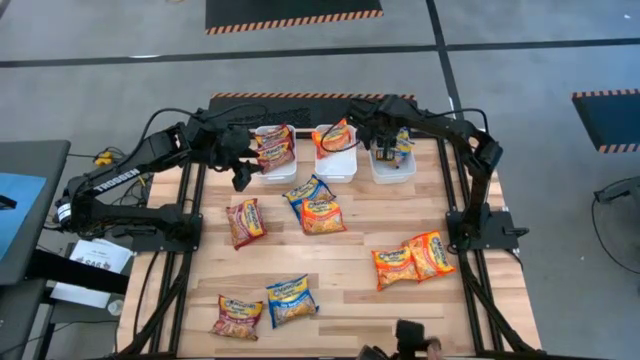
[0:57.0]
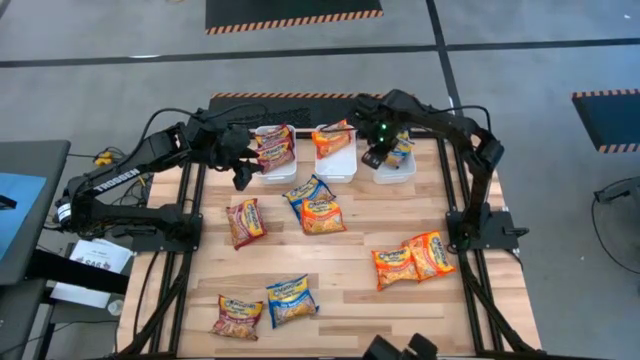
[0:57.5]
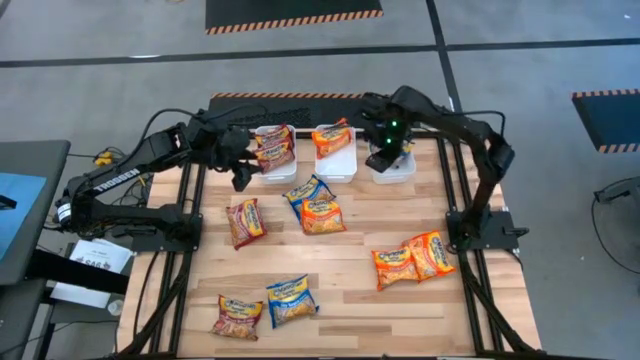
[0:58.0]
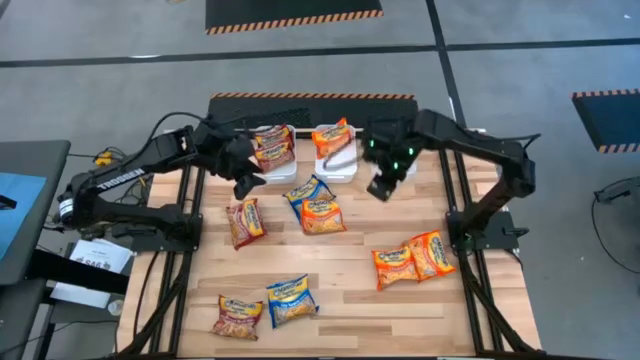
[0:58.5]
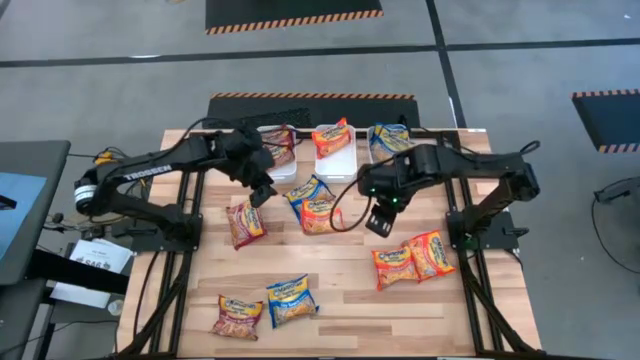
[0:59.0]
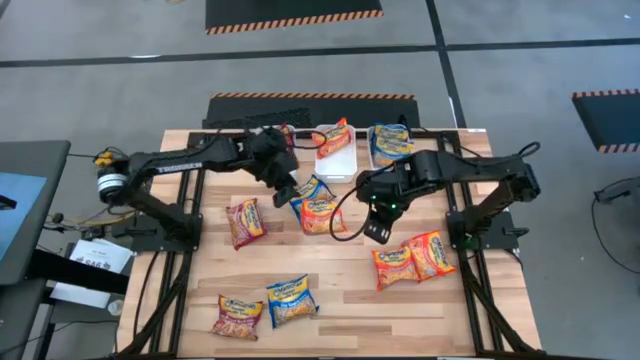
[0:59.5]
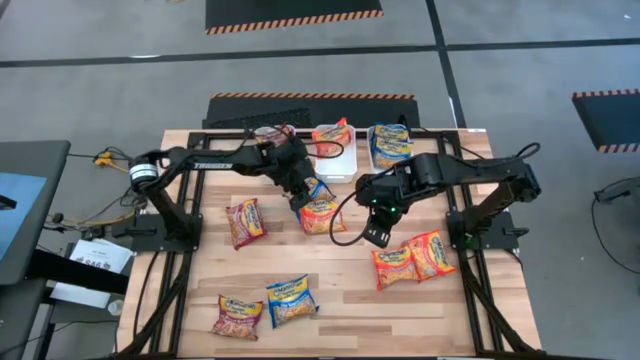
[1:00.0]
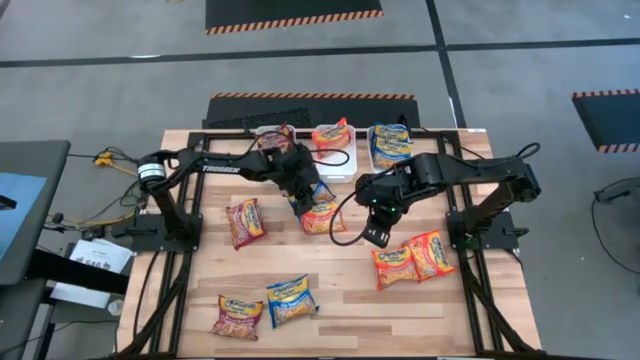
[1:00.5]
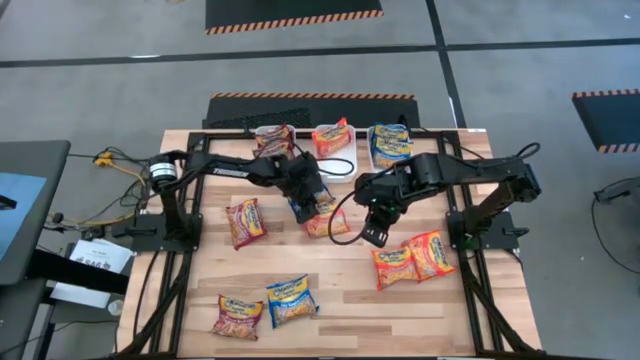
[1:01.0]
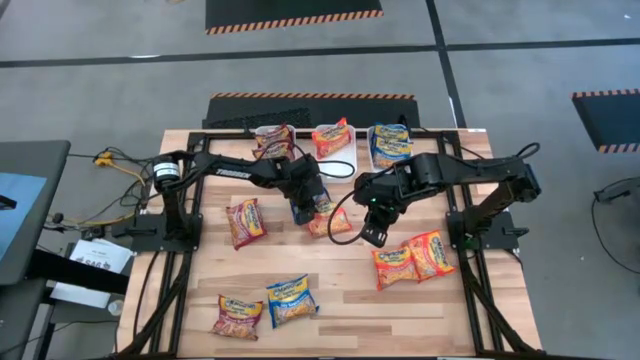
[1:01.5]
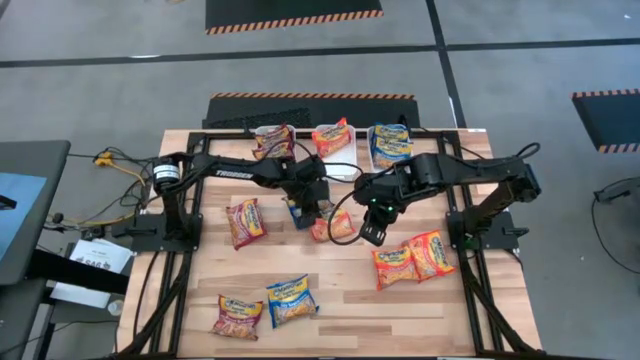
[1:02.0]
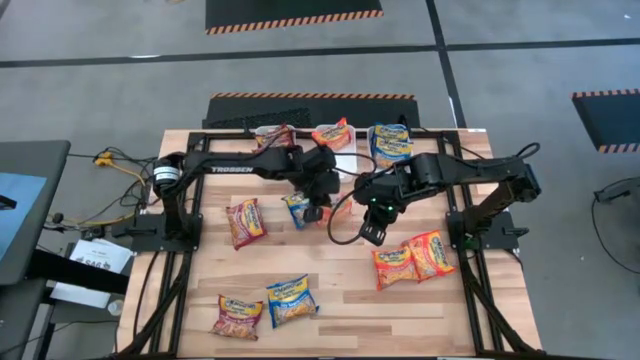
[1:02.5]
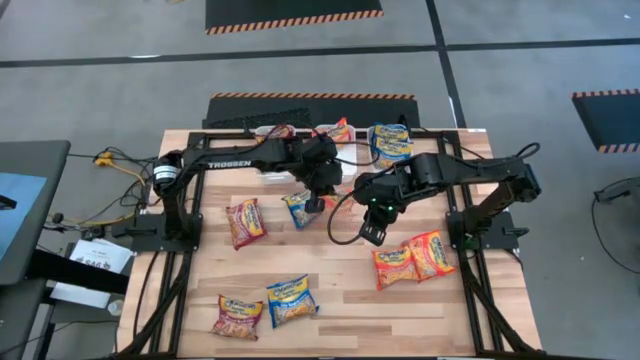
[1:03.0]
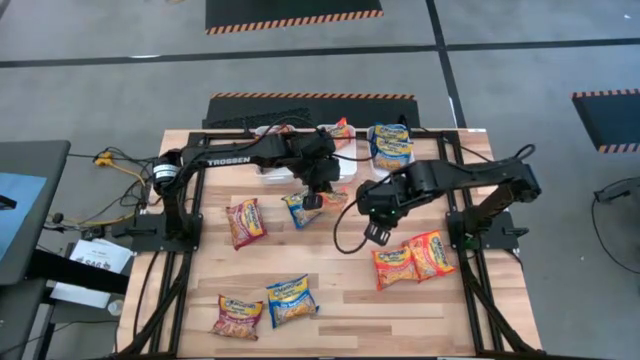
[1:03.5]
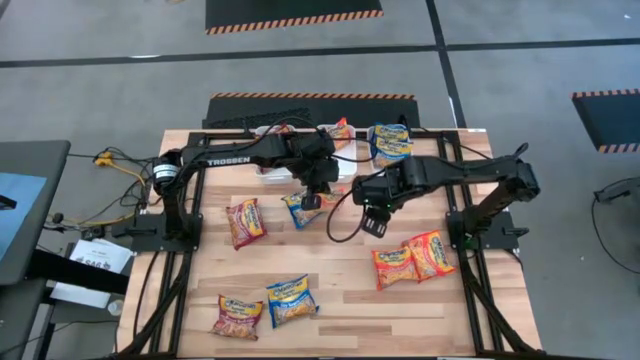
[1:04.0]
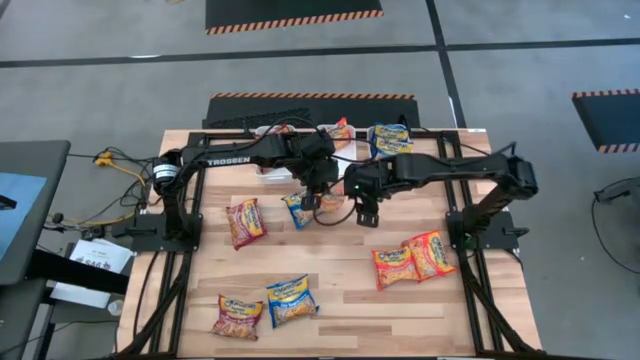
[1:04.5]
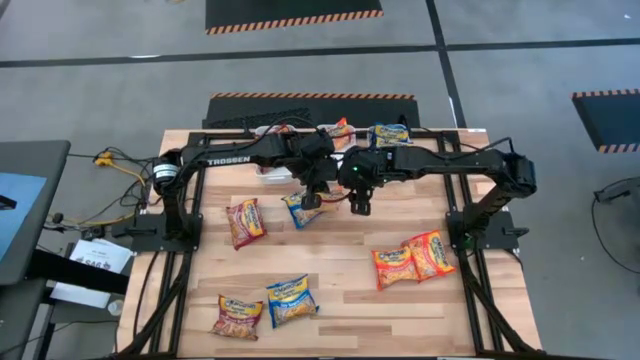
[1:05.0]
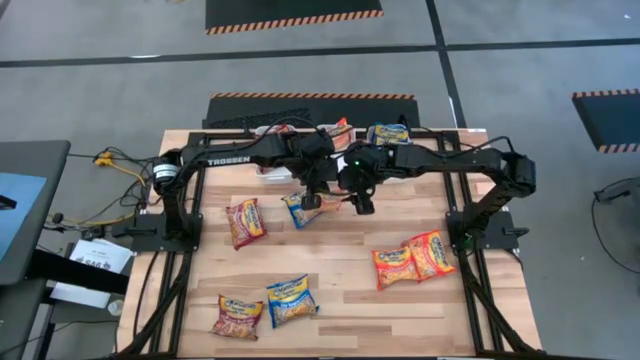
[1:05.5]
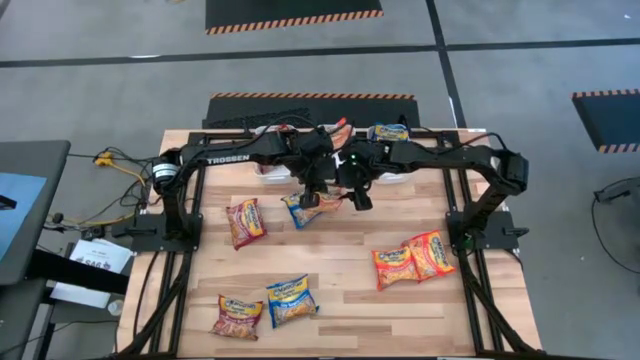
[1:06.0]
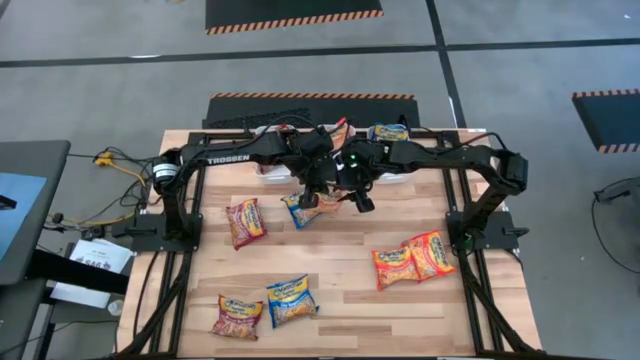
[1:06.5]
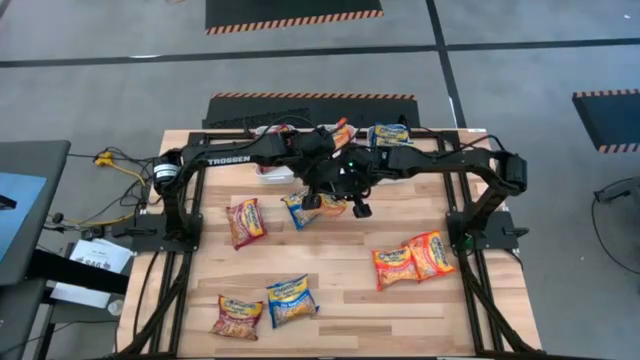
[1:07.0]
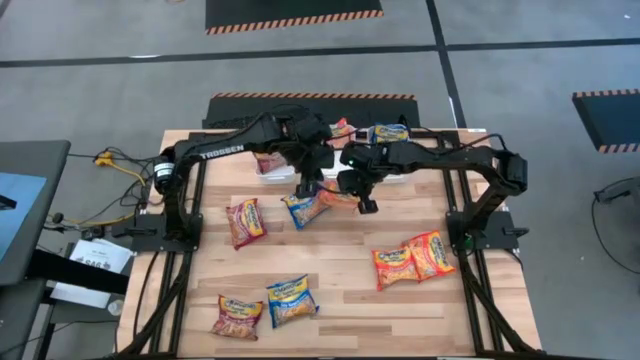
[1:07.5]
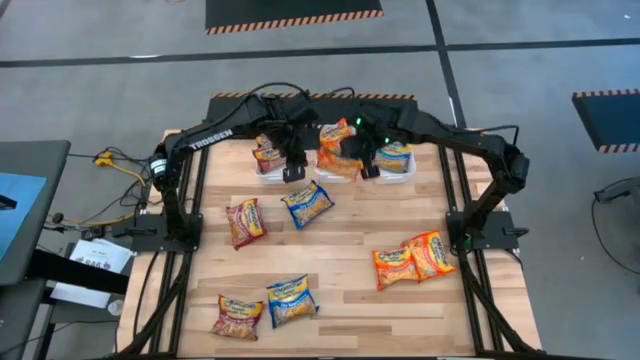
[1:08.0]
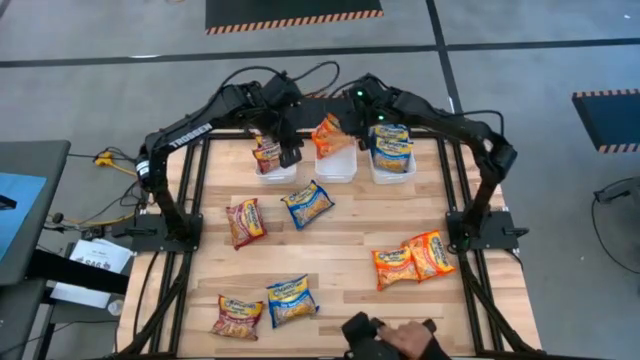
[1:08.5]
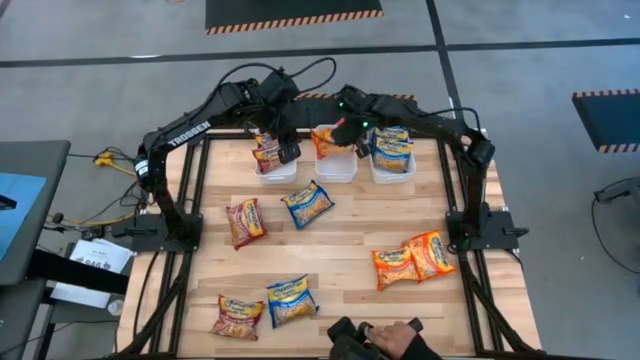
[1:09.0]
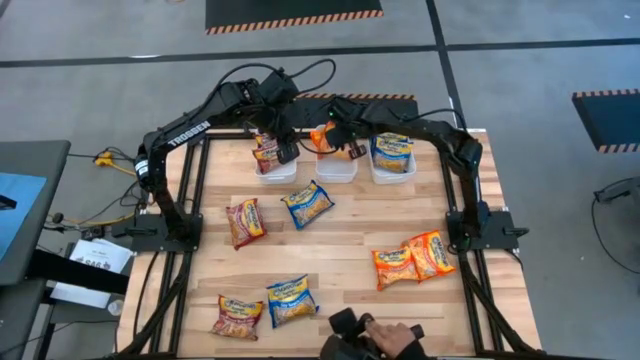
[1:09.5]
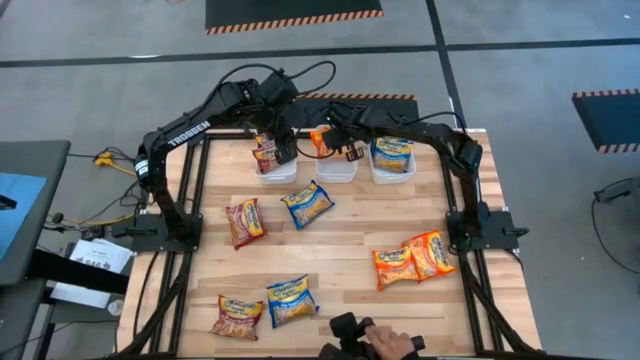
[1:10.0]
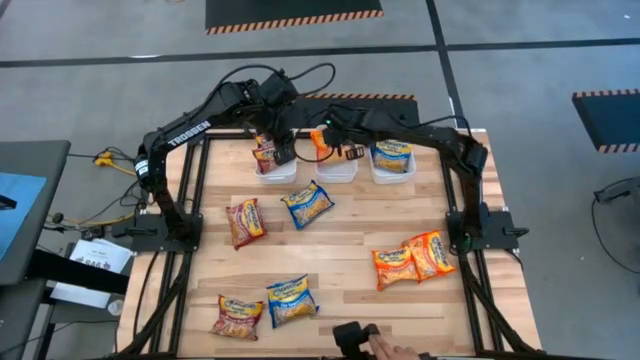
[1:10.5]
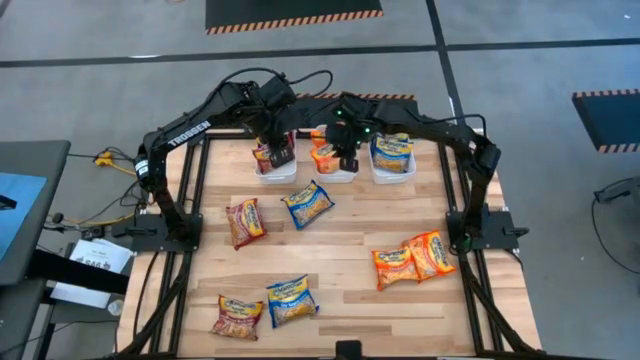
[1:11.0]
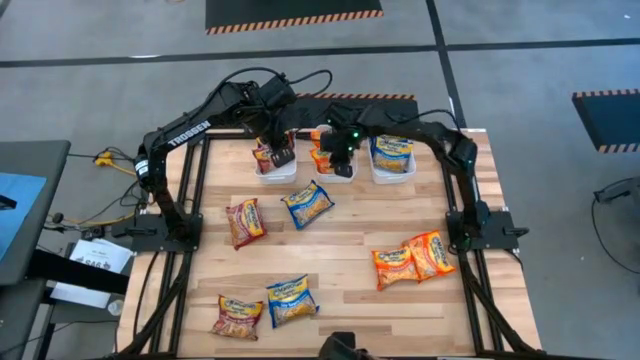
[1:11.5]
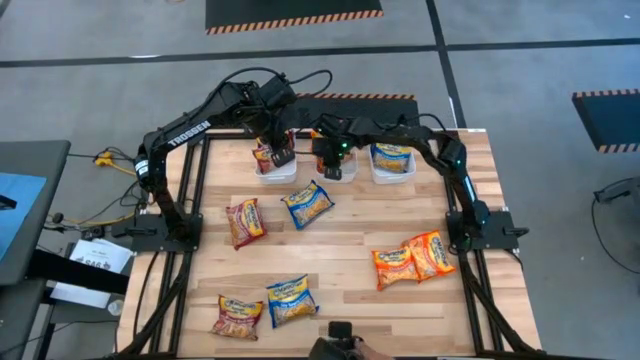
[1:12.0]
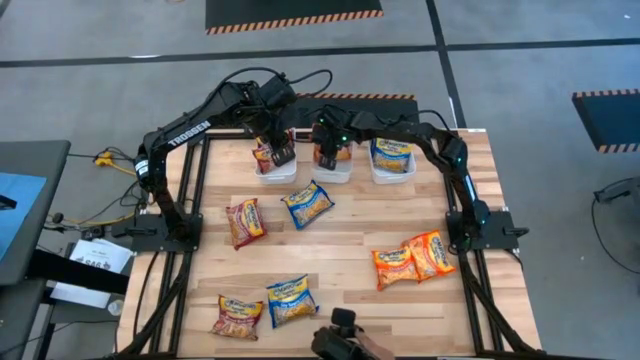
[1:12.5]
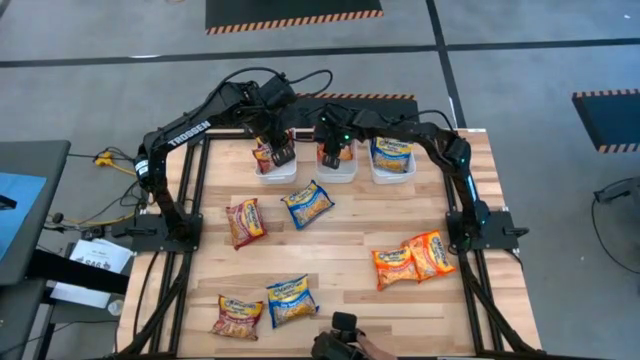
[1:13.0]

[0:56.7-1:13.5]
Task: Sort Maruchan noodles
Put the orange noodle pack into the middle white bin
